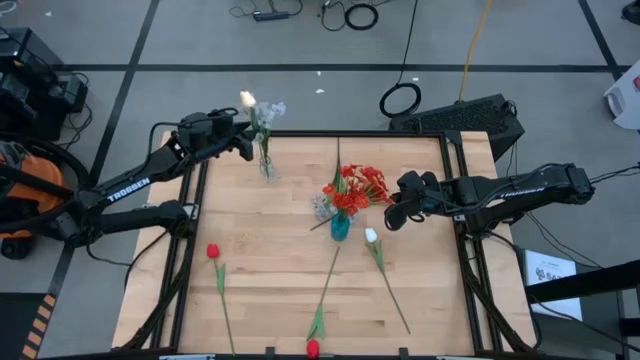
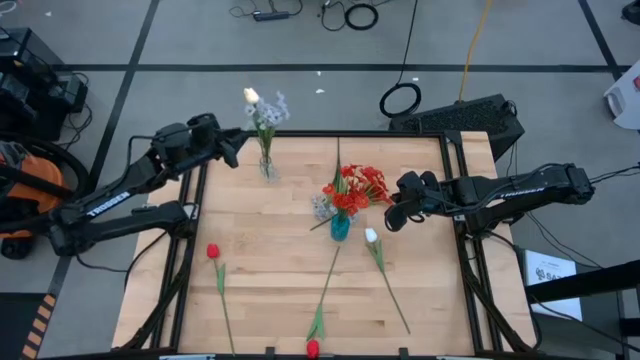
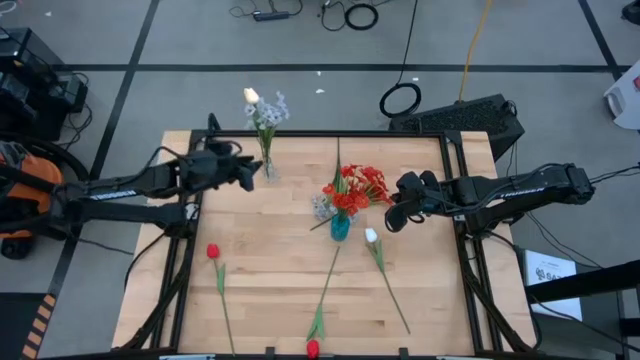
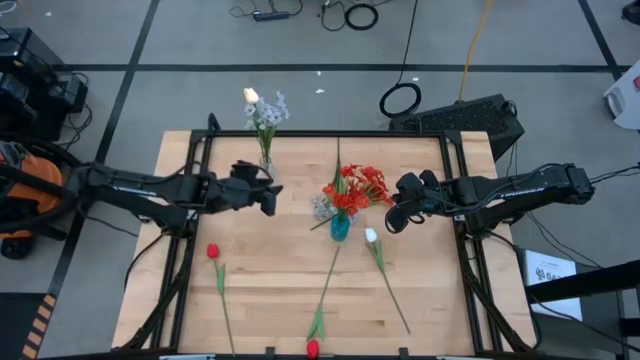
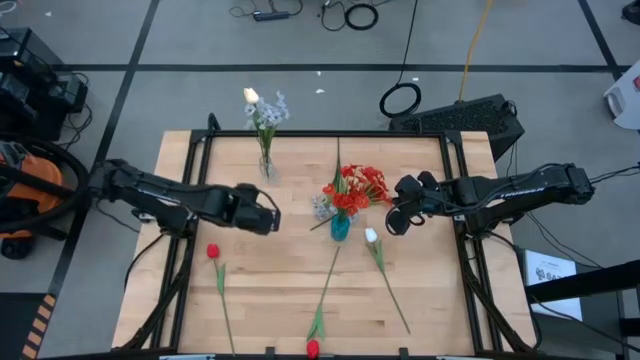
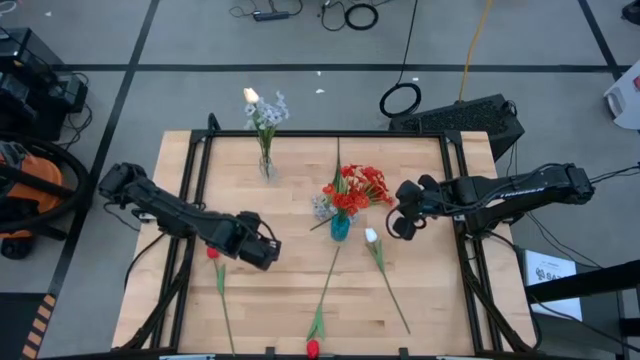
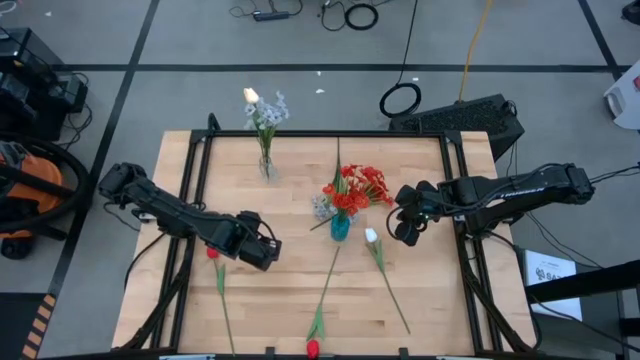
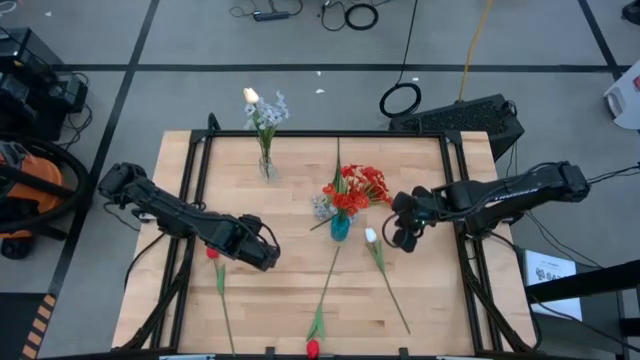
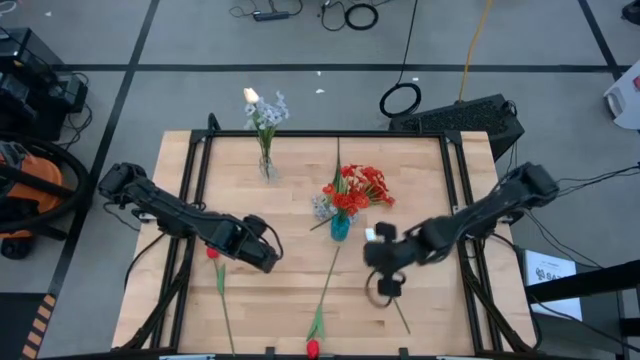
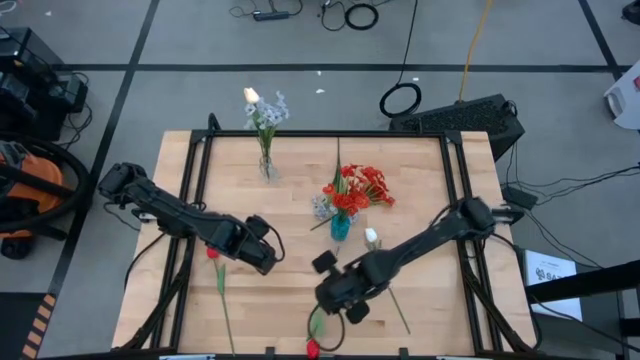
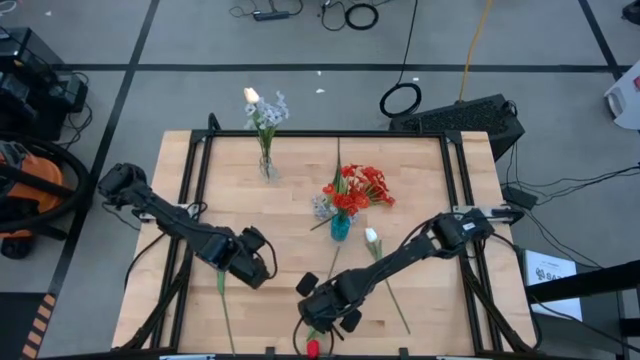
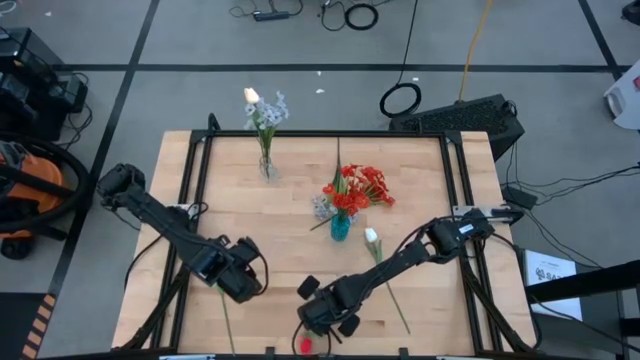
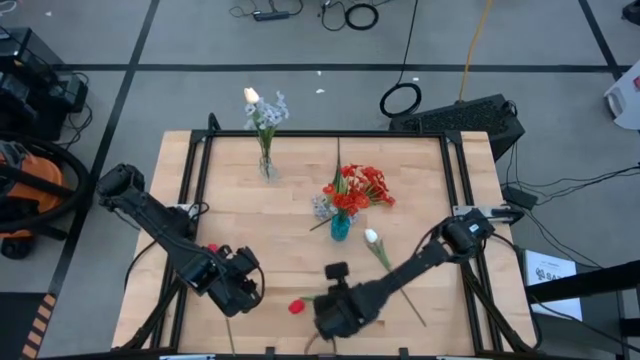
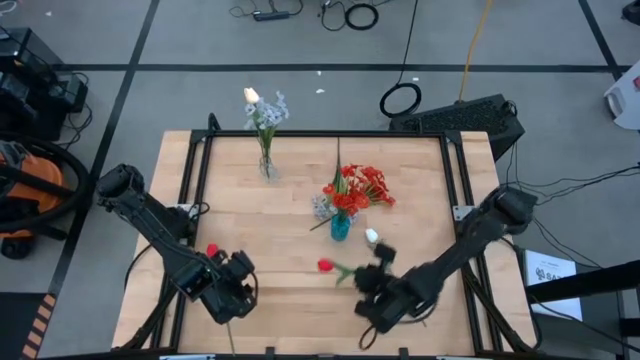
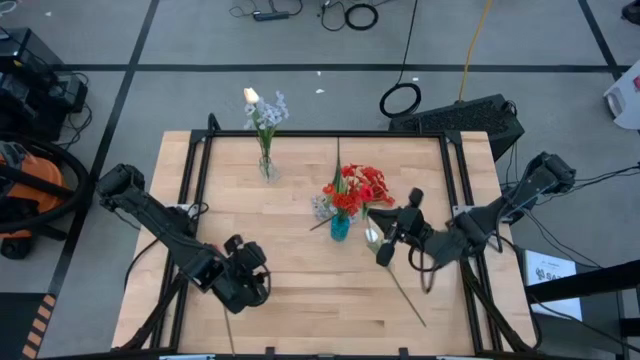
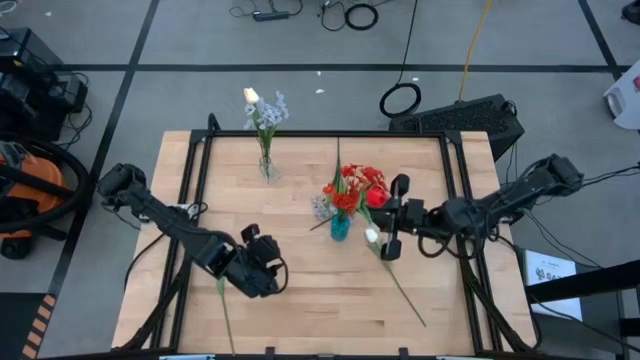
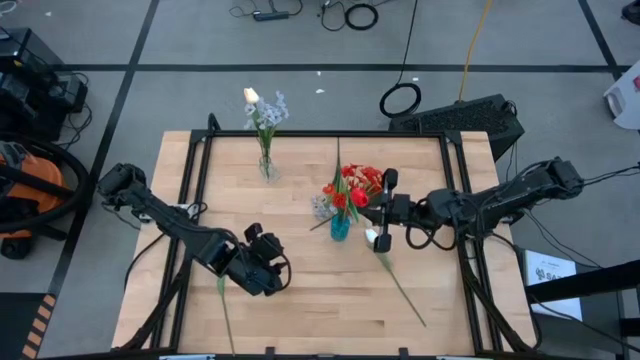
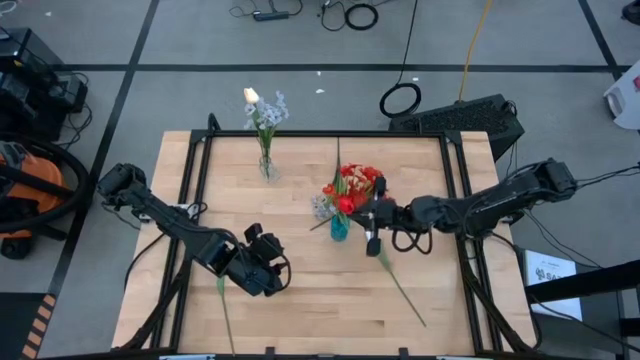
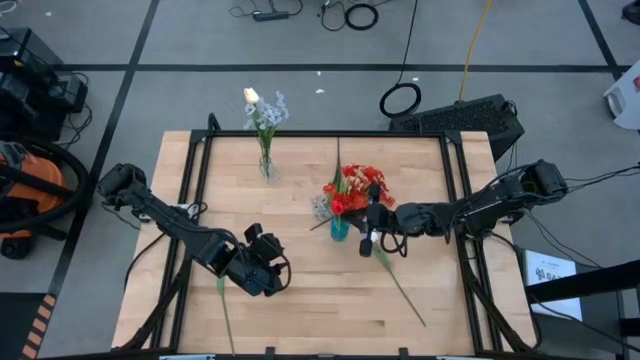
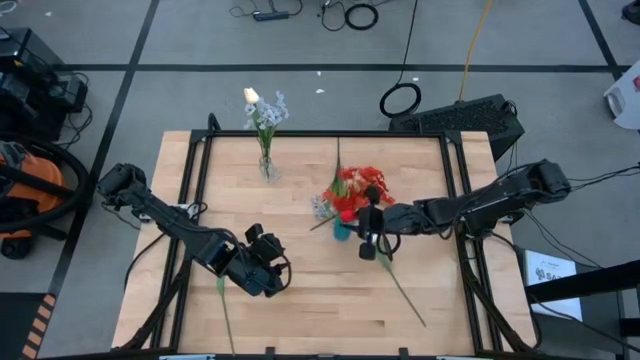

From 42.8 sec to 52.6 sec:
Task: Sort flowers into vase by color
Put the right red tulip into the blue vase

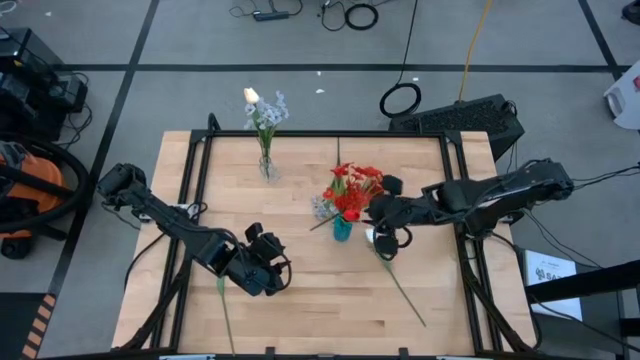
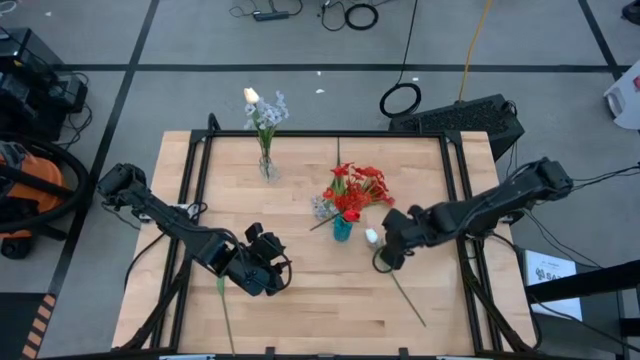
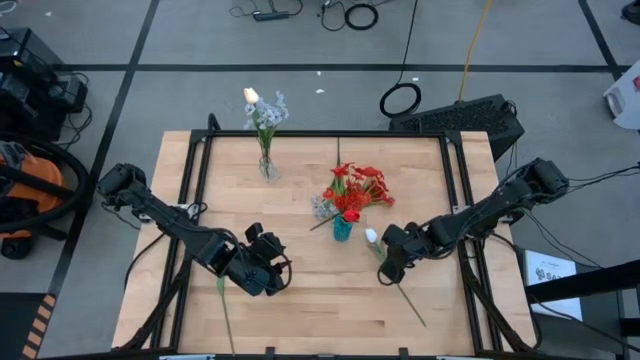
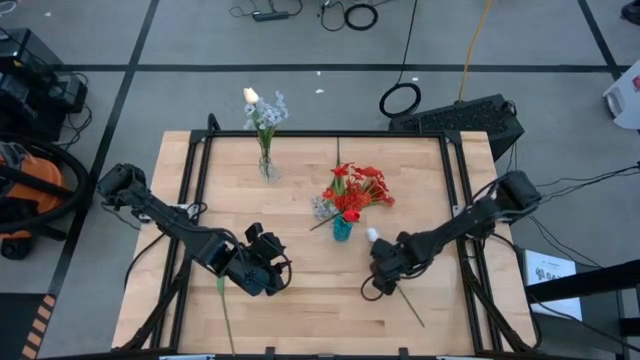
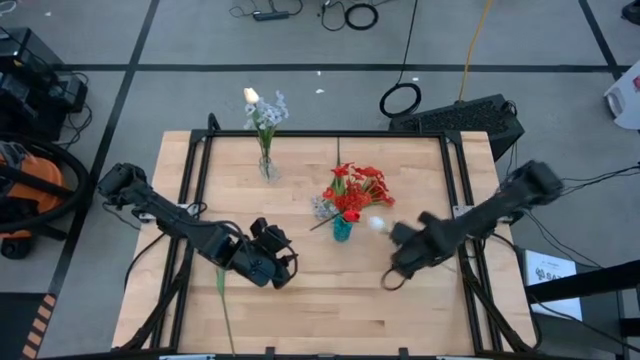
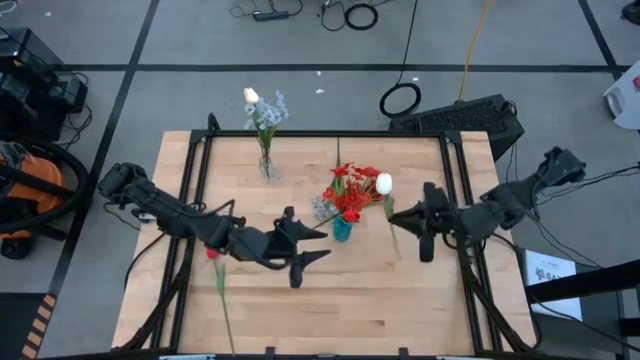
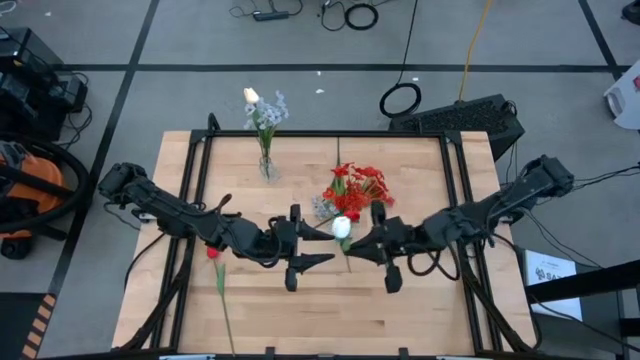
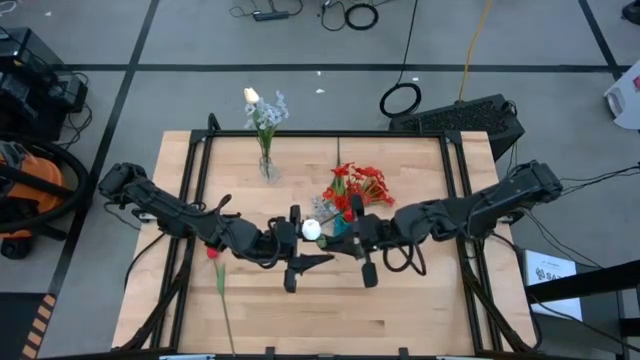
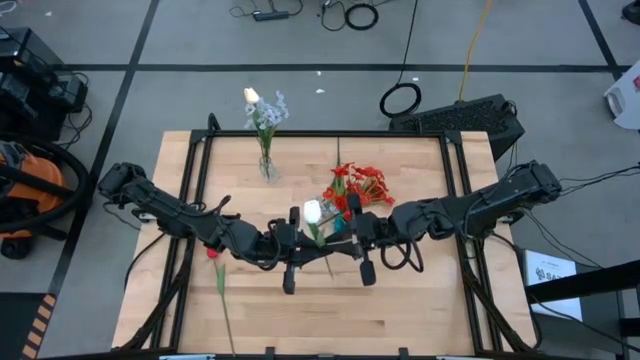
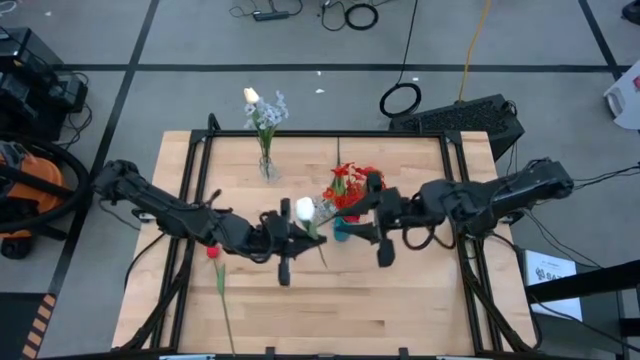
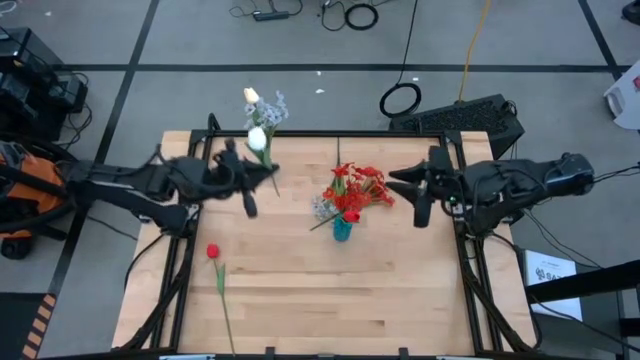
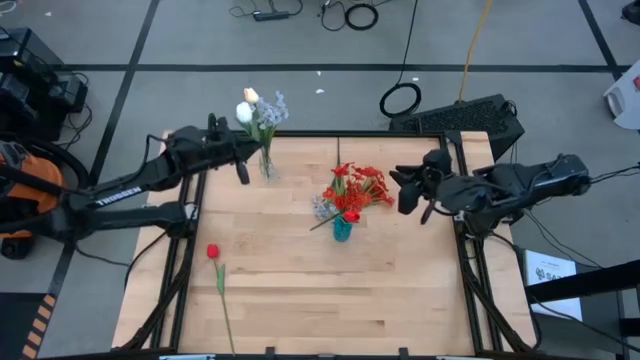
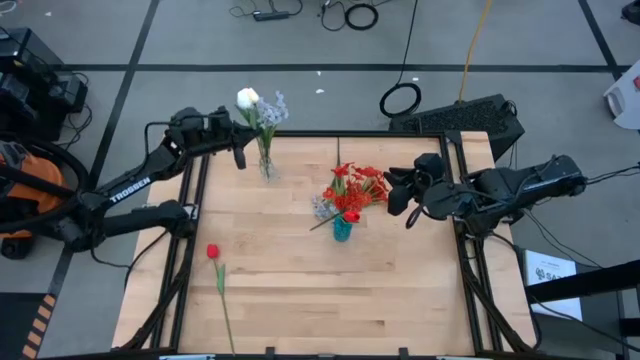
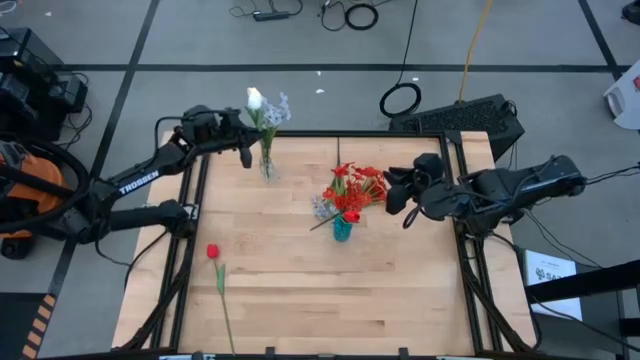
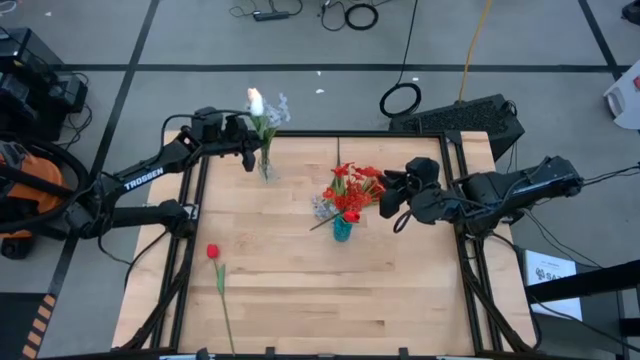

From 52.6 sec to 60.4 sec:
Put the white tulip into the transparent vase

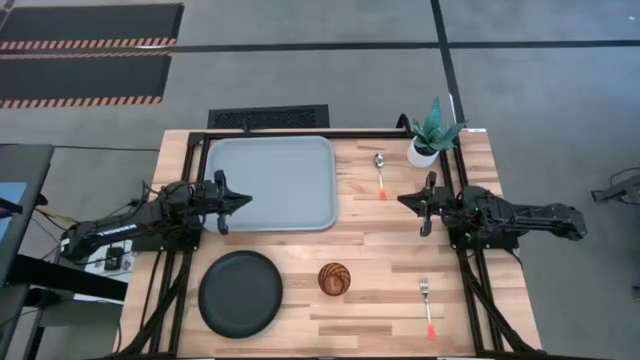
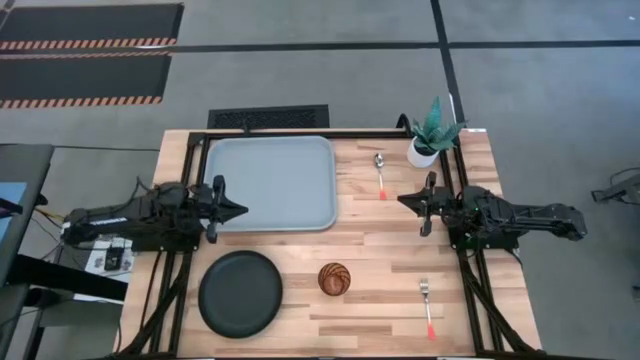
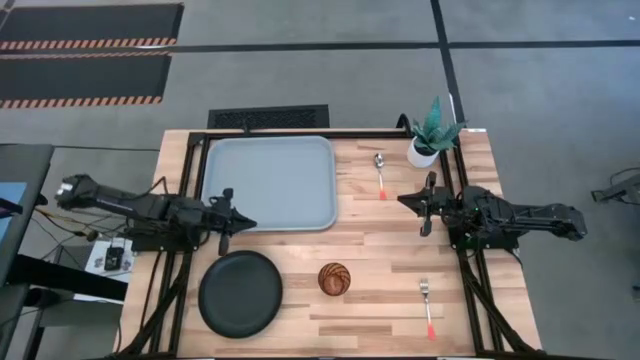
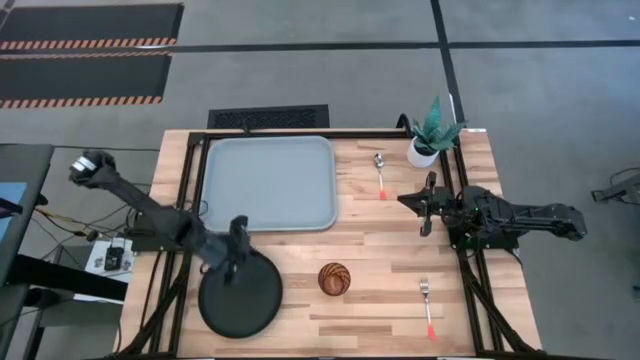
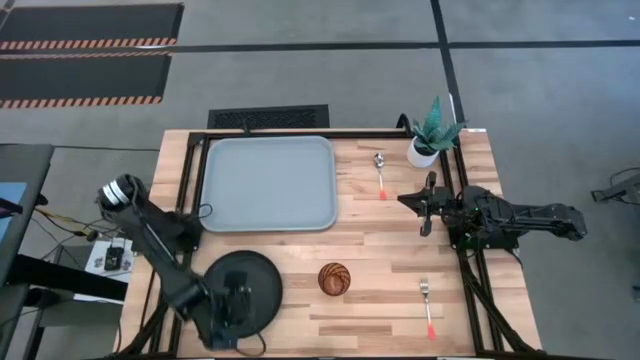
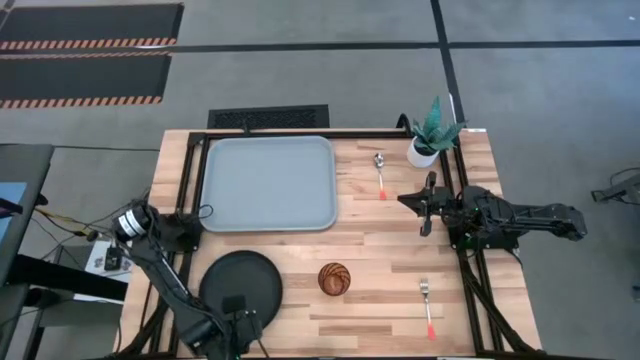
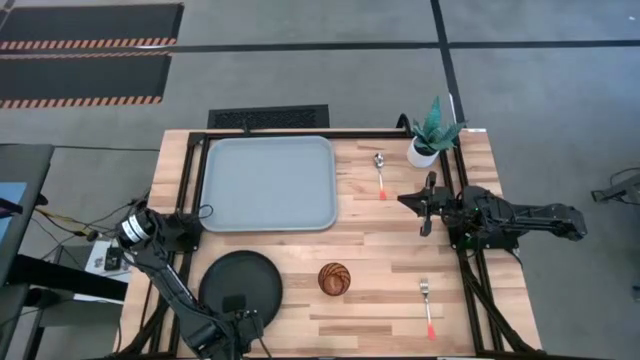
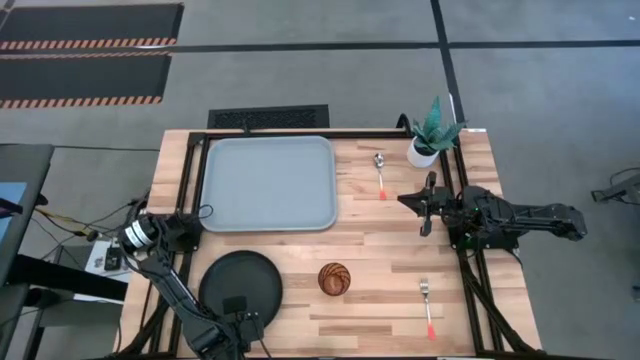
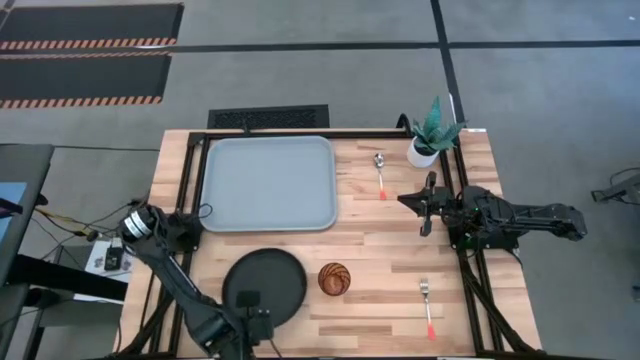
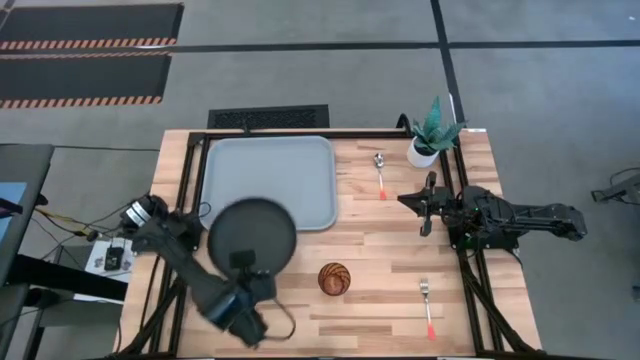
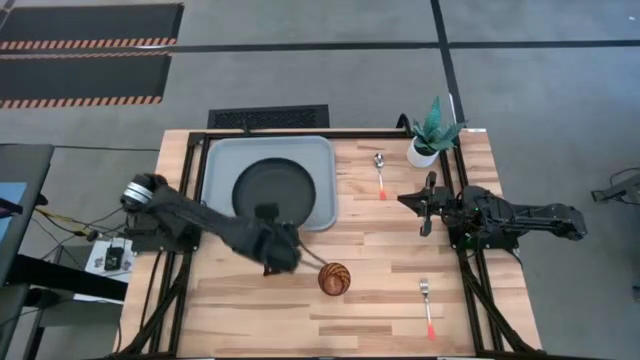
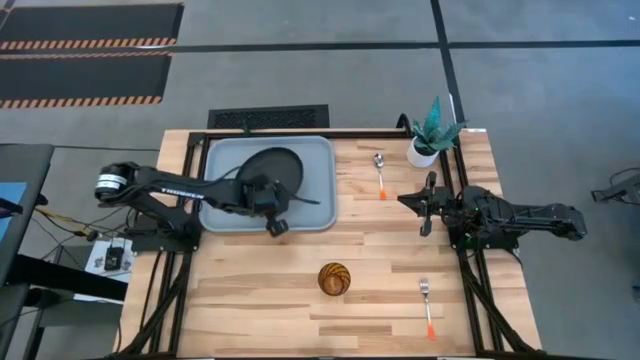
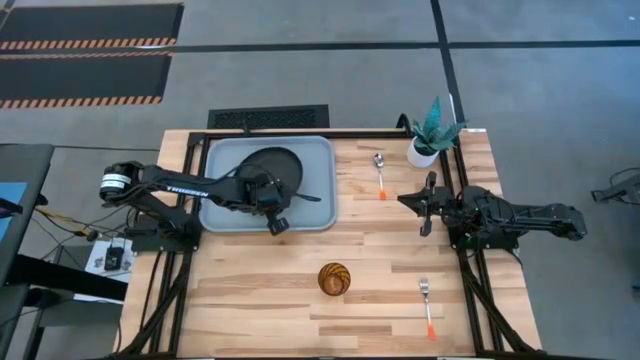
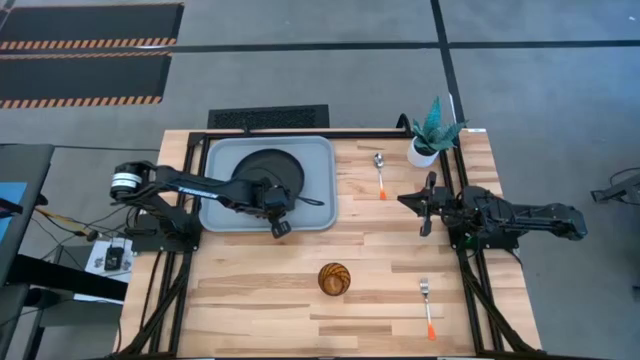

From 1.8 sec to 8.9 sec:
Task: Pick and place plate/cup/fork/spoon on tray
Put the black plate on the middle of the gray serving tray
